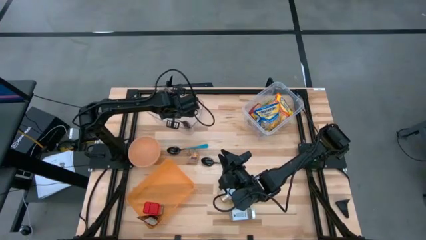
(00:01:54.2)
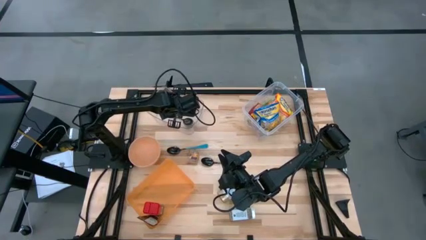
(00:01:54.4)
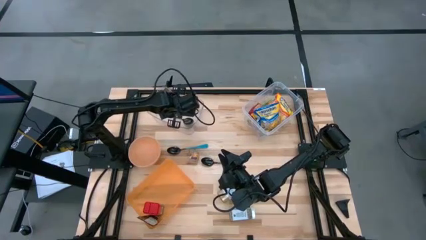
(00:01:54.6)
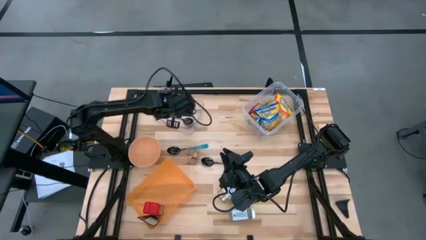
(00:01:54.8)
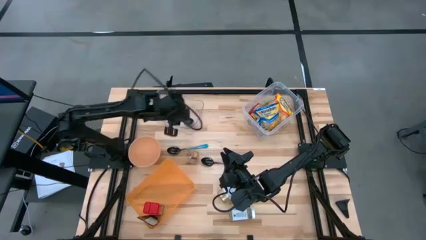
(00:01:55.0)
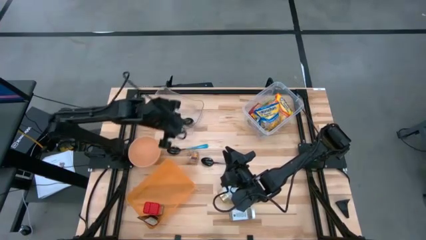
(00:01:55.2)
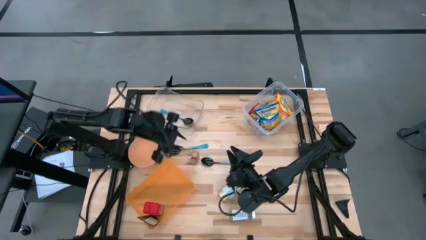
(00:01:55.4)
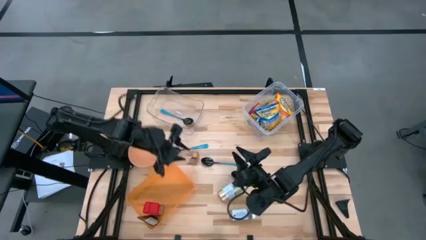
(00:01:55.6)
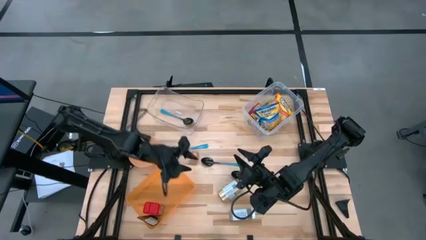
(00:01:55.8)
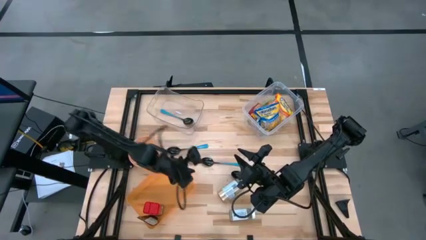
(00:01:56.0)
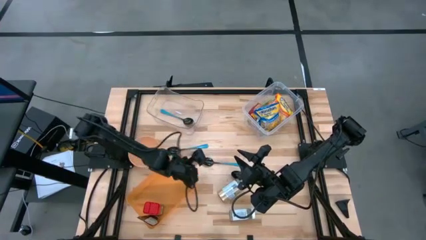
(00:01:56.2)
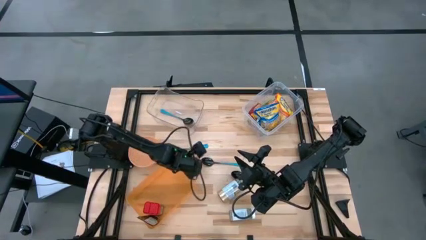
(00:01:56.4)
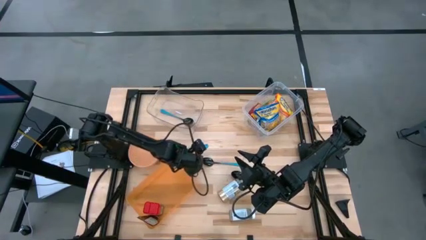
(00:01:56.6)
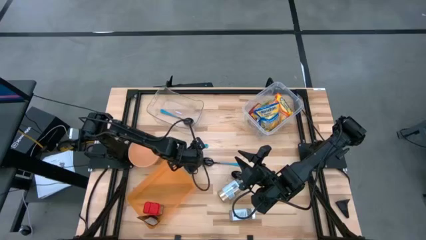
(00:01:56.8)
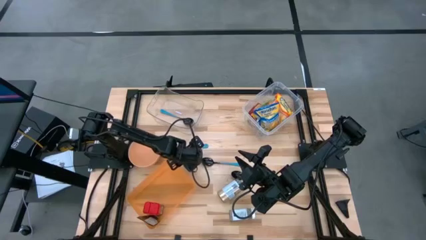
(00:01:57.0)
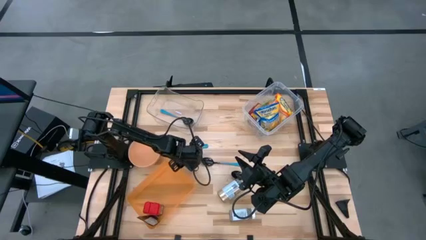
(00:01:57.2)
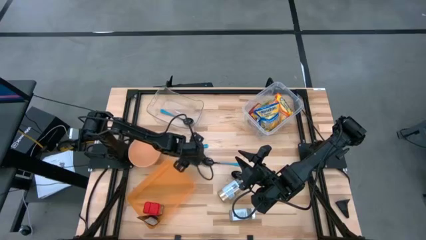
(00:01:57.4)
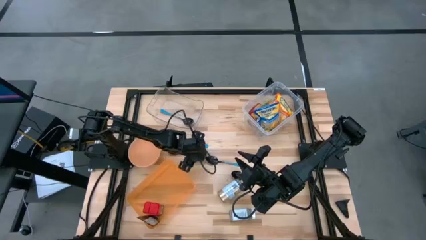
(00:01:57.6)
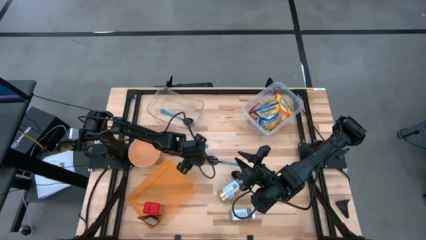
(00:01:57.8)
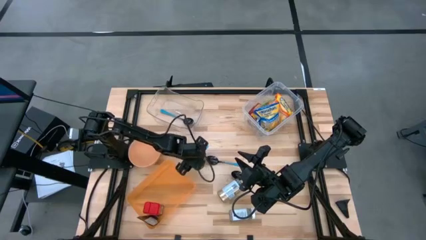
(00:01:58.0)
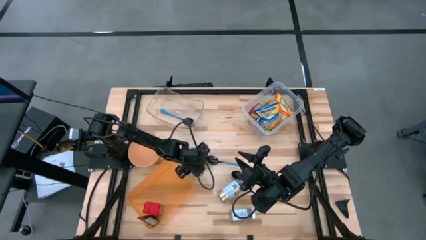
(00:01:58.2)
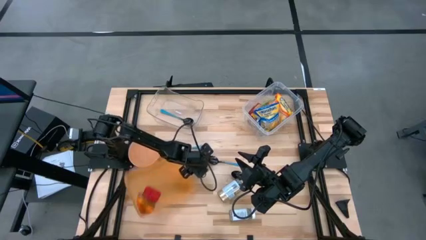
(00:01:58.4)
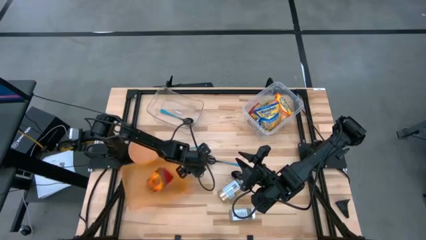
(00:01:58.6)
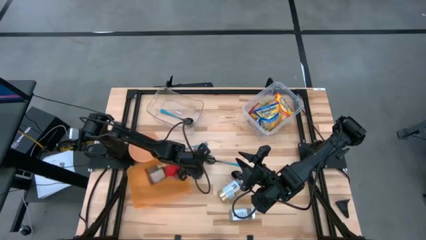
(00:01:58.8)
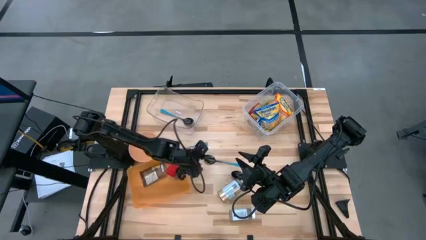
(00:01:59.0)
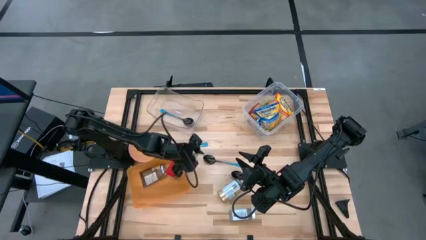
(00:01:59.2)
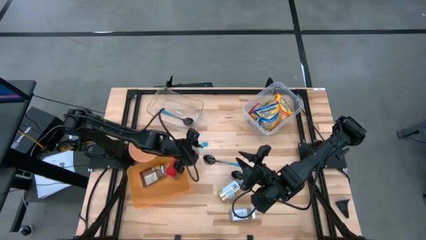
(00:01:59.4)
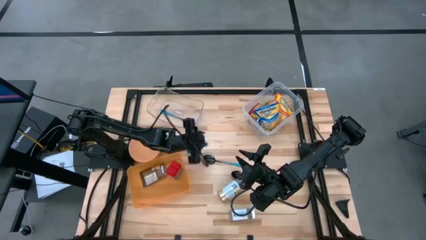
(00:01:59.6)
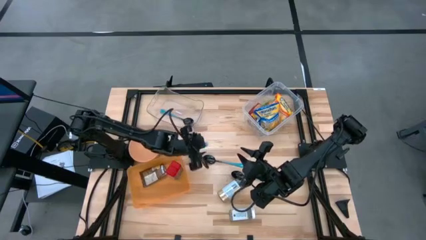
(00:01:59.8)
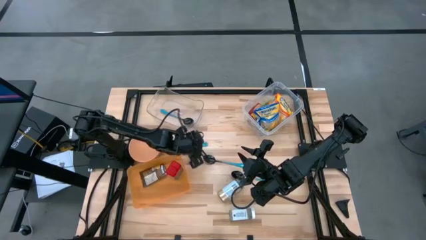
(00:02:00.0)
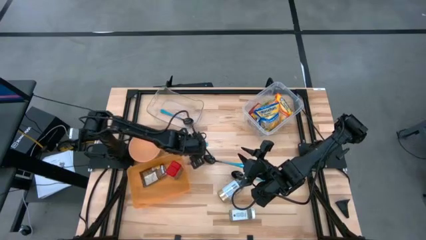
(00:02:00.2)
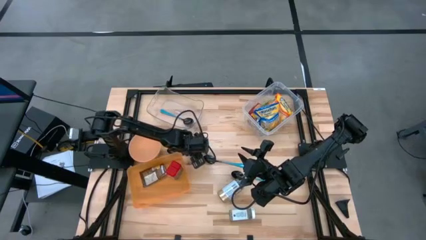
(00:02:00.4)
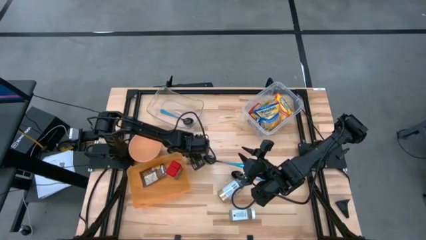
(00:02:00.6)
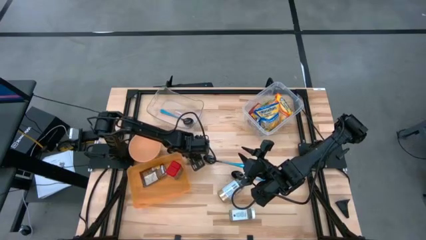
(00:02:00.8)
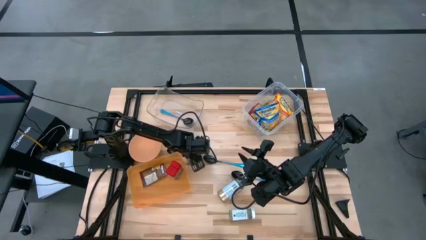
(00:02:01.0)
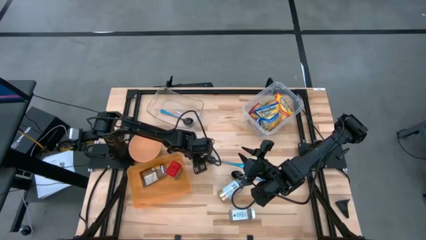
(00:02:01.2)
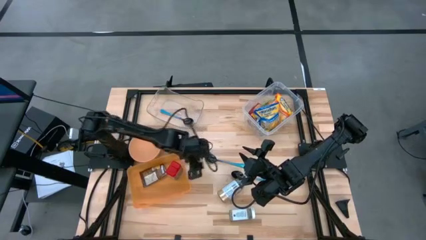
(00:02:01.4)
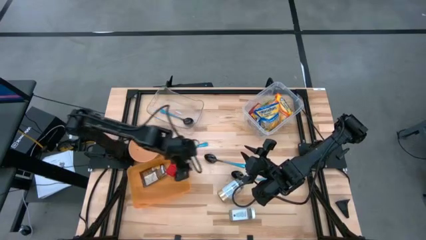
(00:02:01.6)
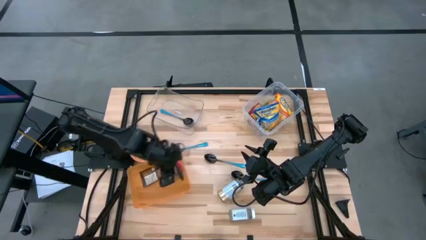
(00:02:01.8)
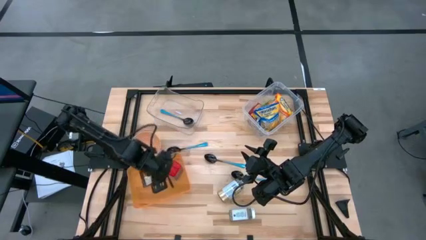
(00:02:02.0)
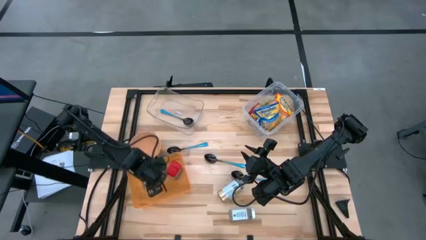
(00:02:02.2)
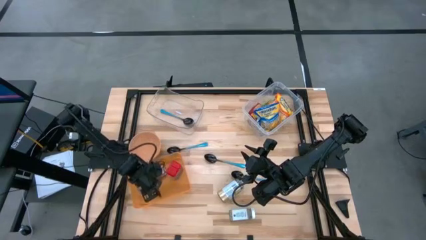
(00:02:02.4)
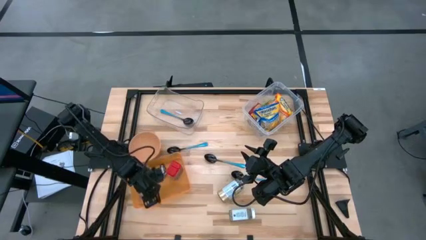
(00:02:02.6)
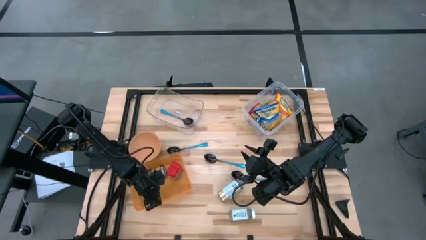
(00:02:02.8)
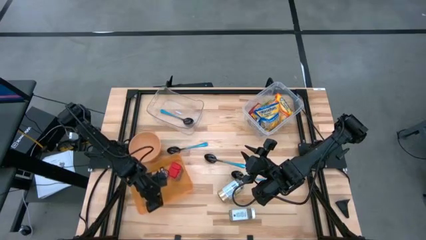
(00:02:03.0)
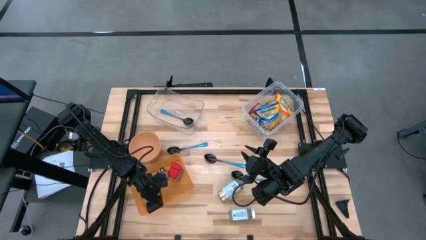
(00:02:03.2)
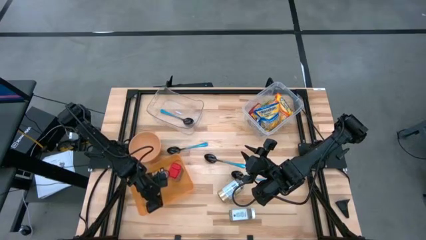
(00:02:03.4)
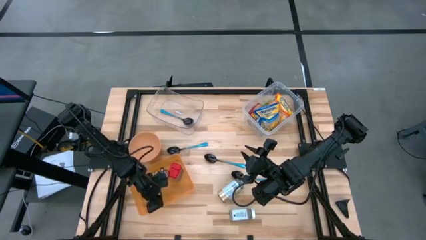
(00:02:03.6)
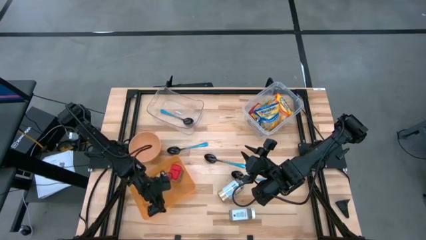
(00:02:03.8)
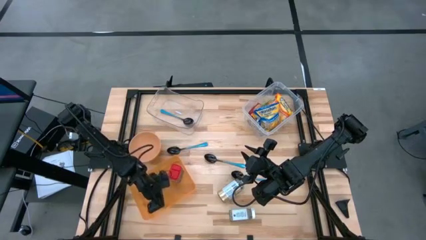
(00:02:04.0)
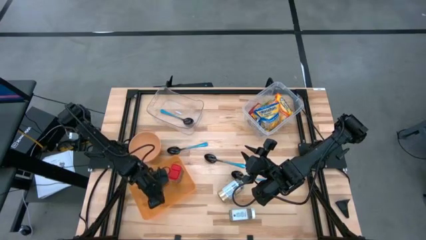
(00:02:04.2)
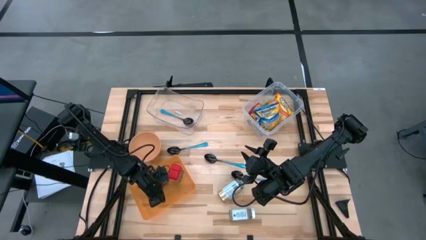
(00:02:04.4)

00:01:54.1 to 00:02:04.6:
Task: Pick & Place Food Item
Put the brown seasoning bottle into the orange bin
